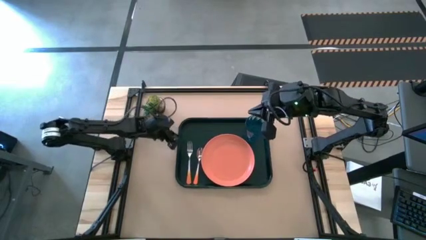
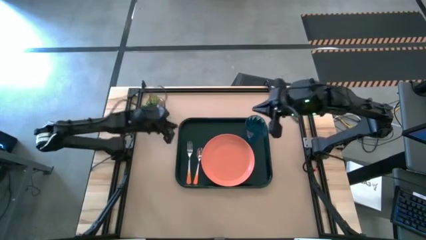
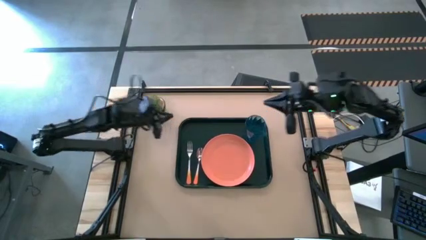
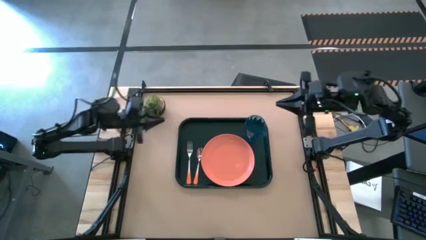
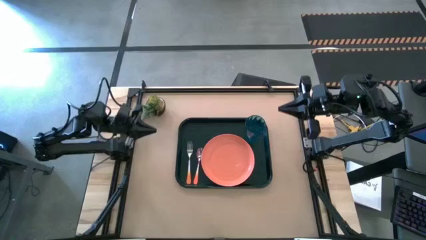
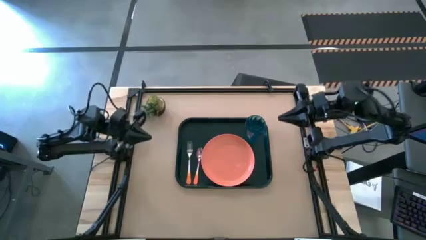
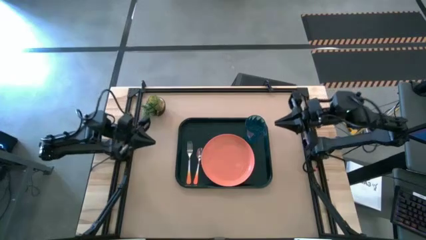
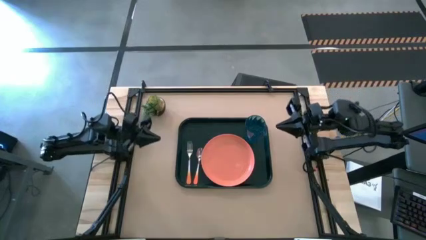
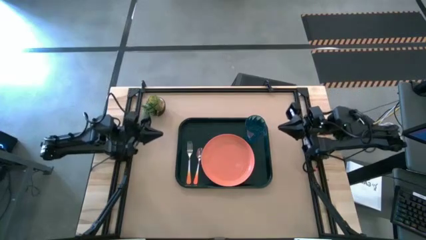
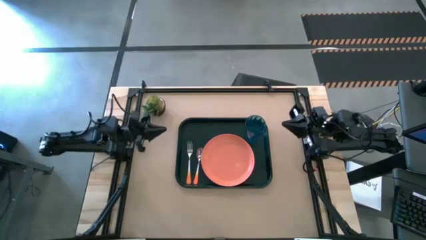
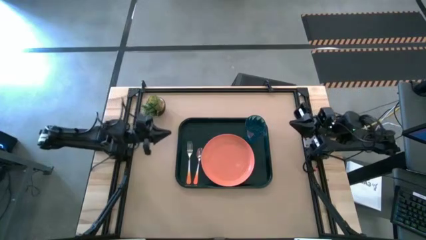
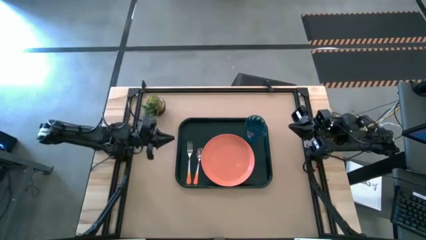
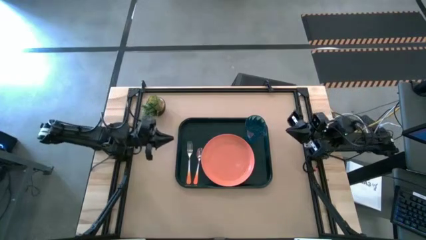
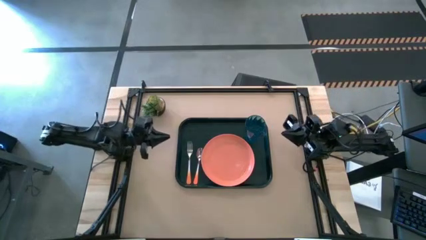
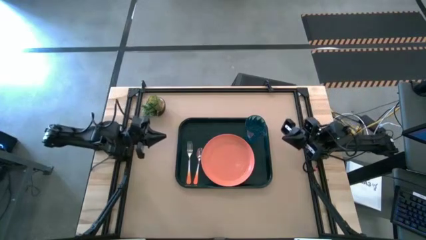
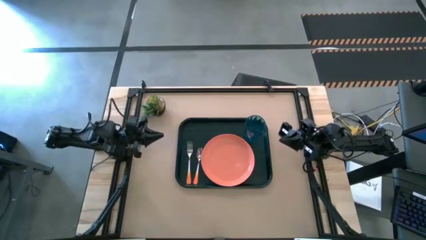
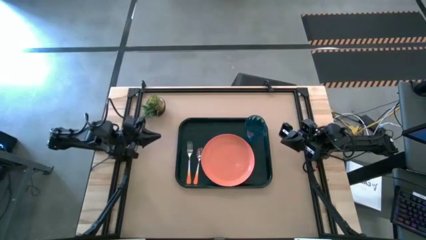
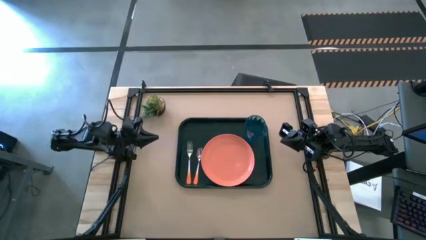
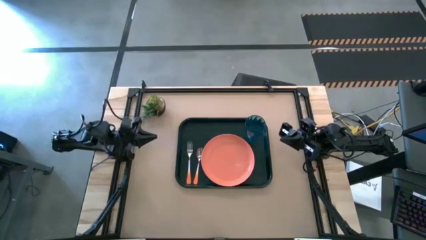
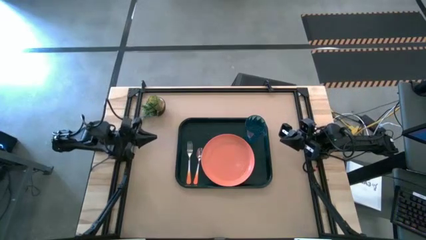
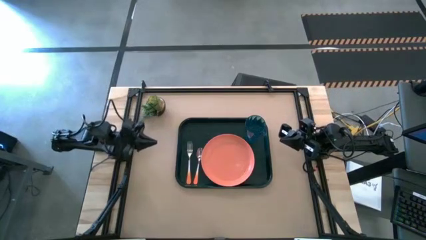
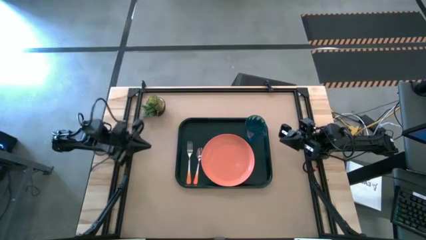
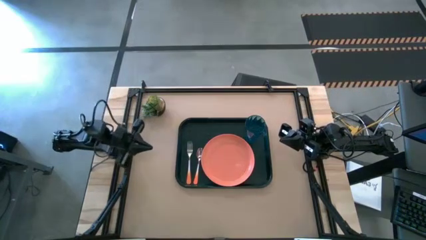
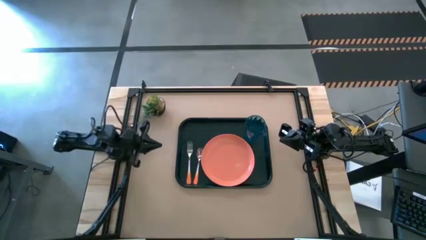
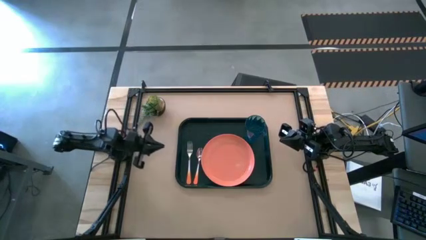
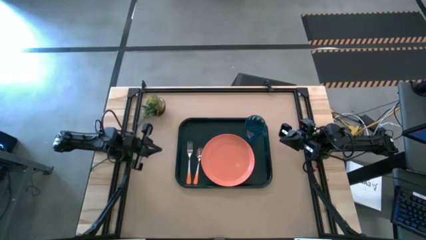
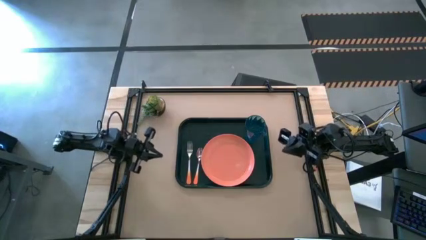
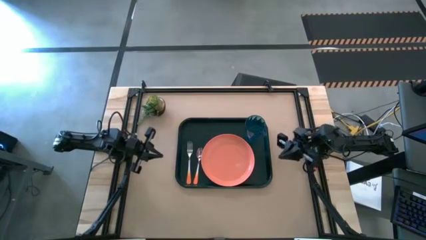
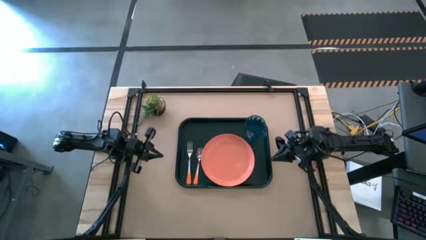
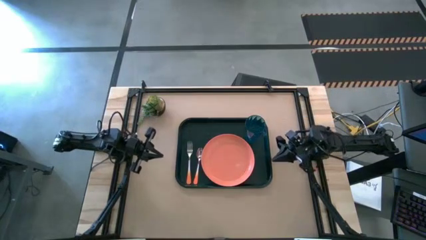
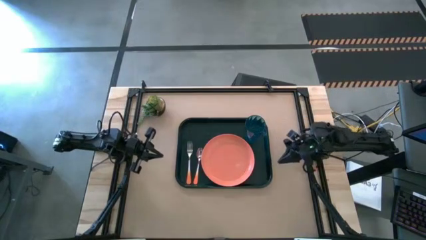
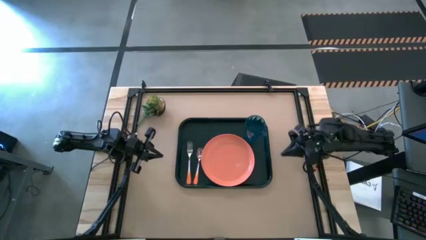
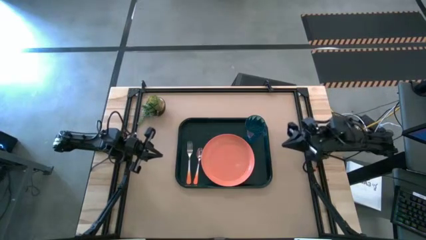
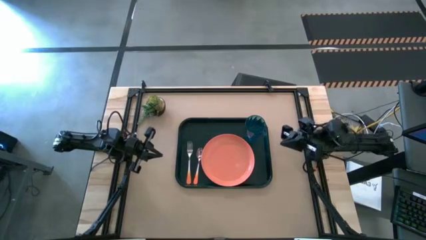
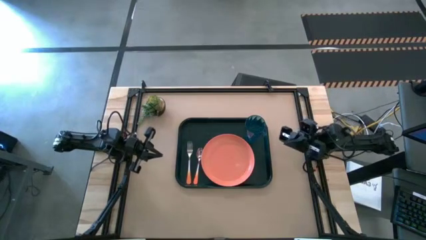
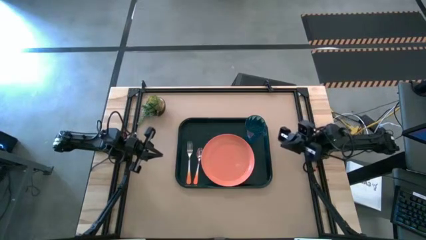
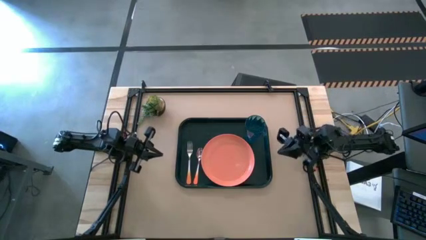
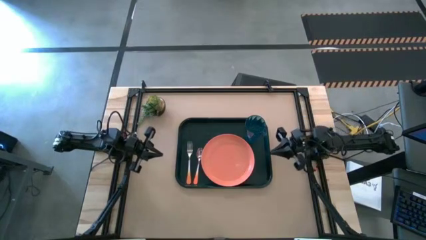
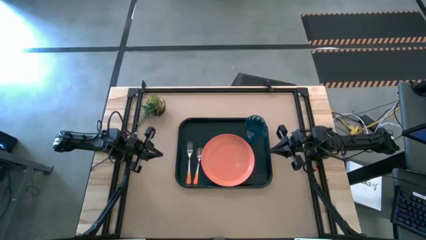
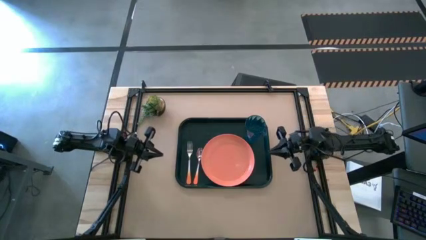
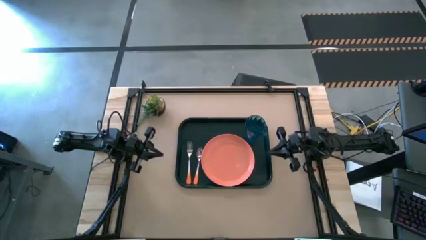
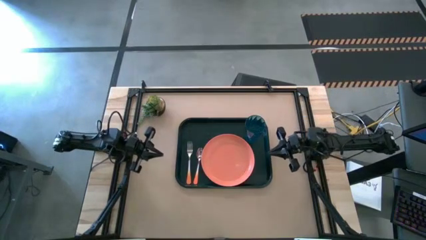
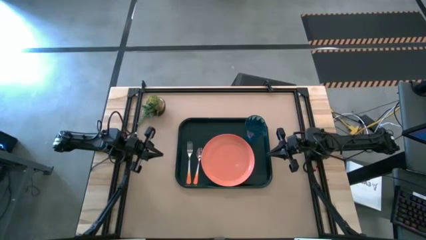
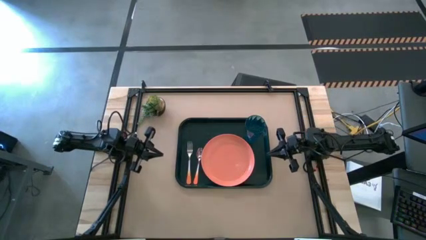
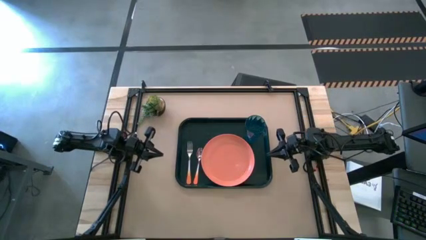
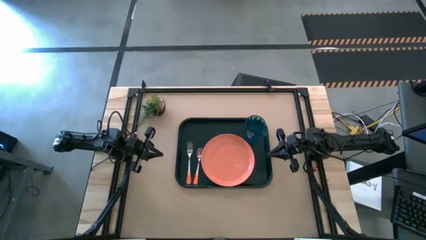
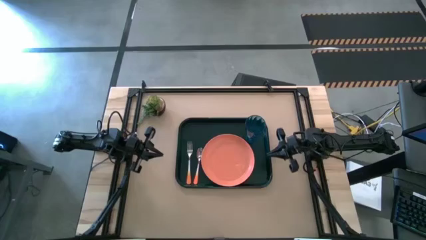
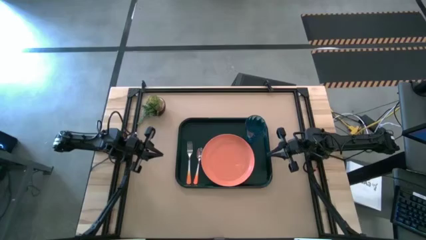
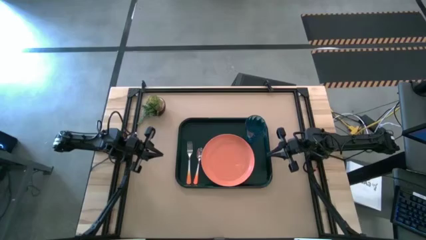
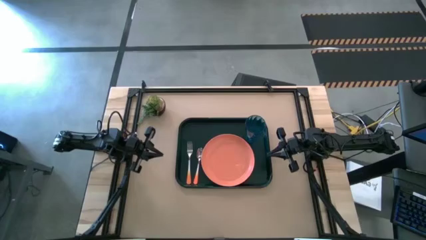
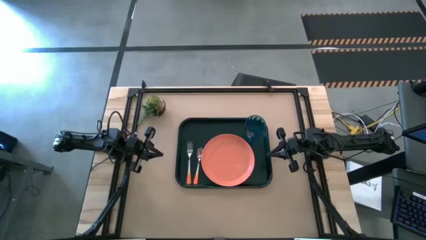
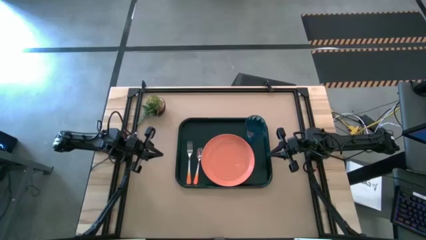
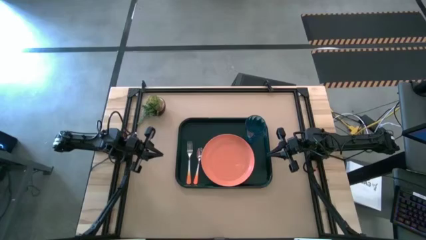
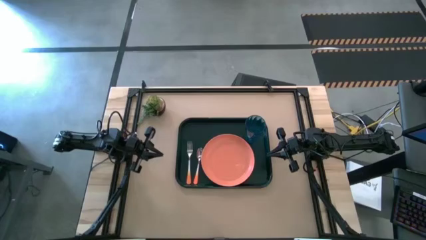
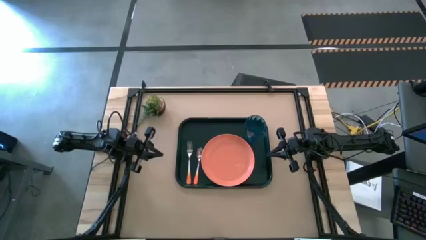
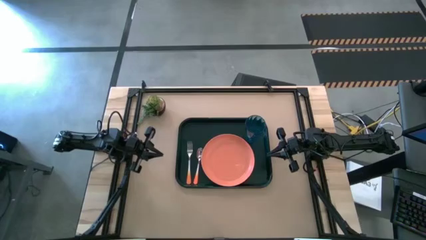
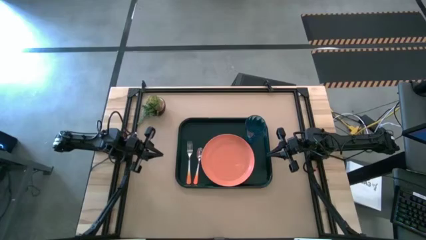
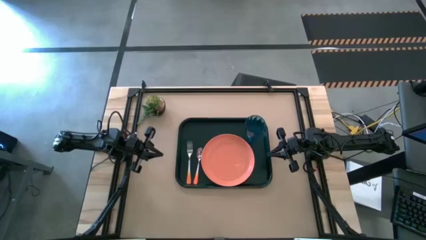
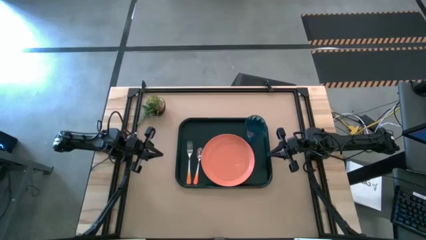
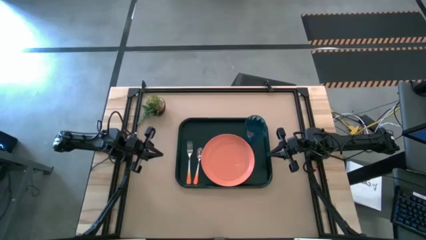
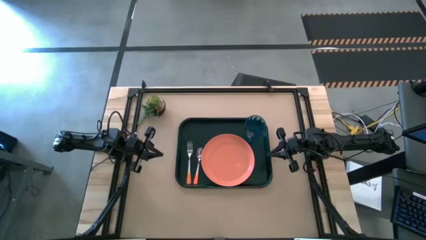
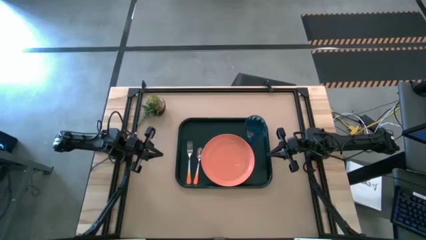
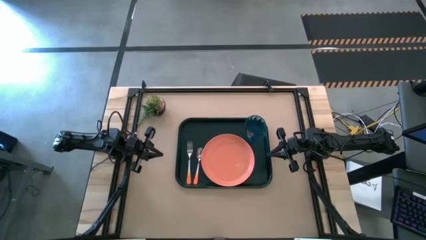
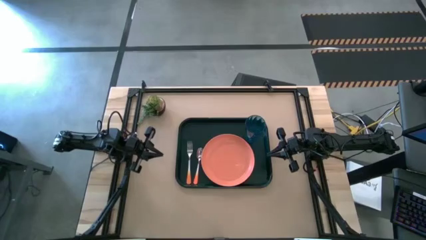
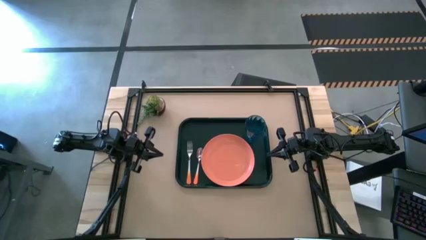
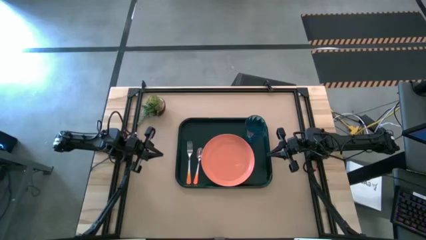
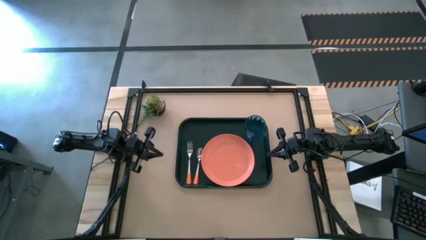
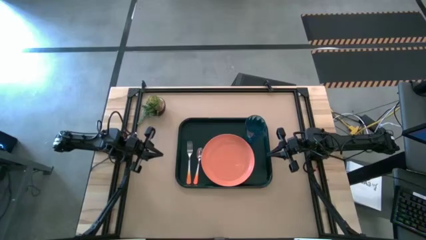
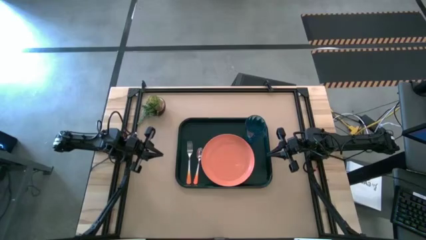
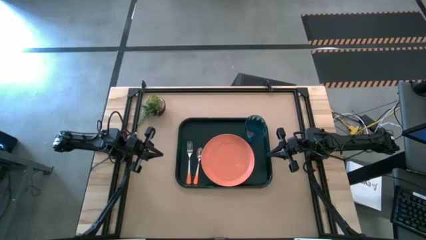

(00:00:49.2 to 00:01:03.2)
Task: Pick and place plate/cup/fork/spoon on tray
Return to Home Position
